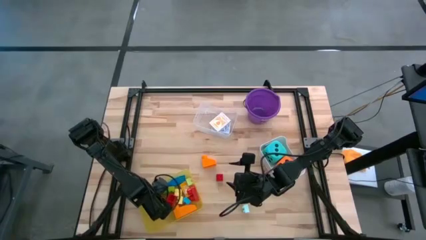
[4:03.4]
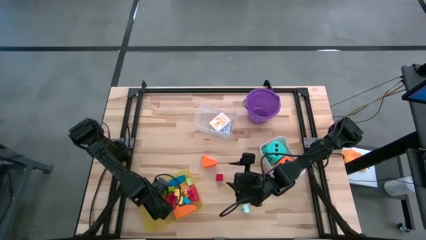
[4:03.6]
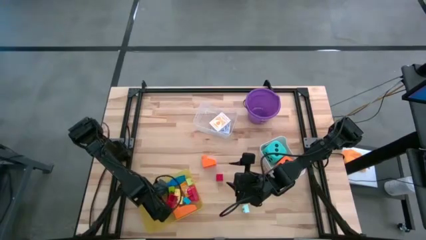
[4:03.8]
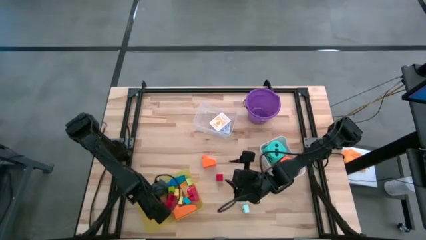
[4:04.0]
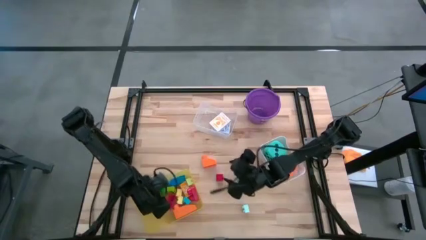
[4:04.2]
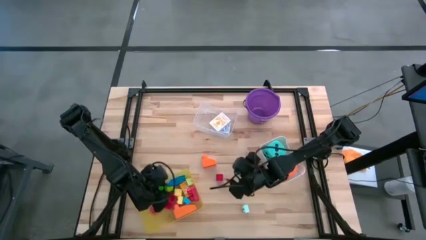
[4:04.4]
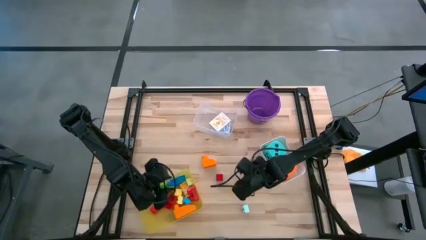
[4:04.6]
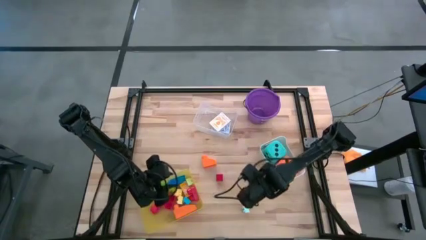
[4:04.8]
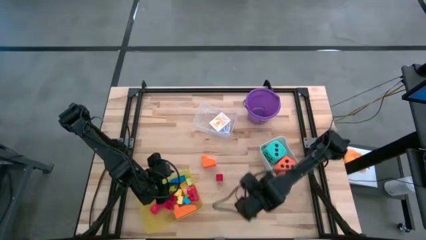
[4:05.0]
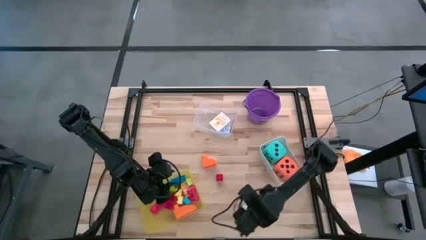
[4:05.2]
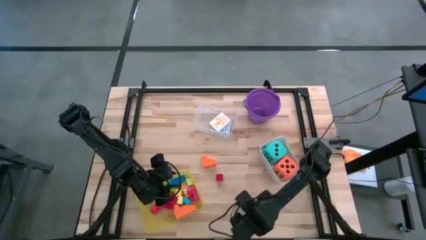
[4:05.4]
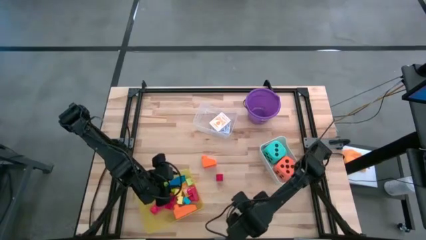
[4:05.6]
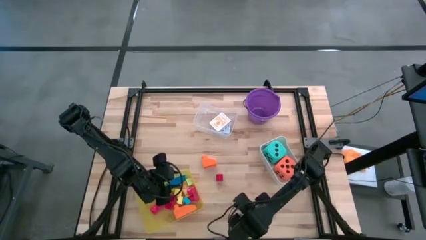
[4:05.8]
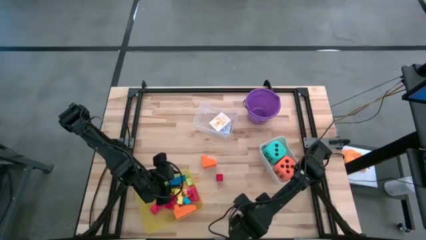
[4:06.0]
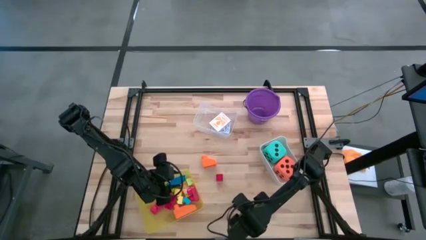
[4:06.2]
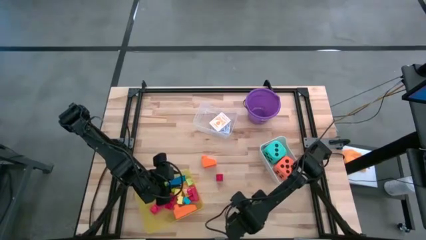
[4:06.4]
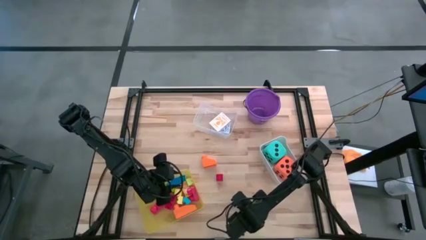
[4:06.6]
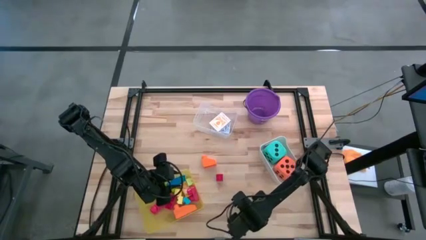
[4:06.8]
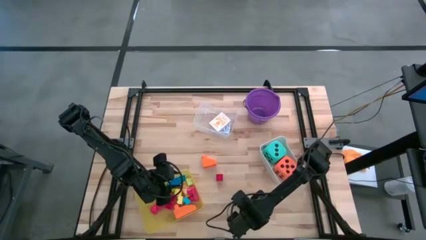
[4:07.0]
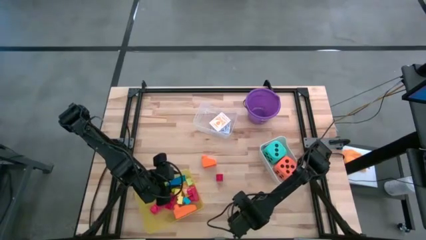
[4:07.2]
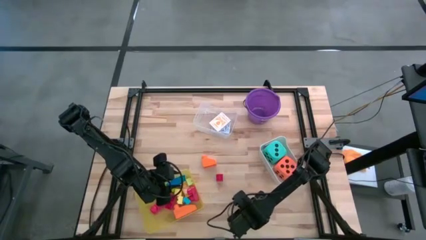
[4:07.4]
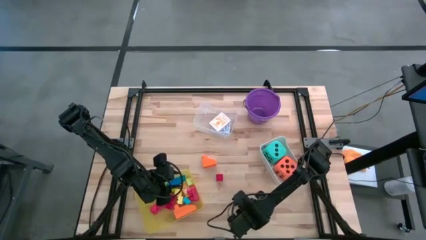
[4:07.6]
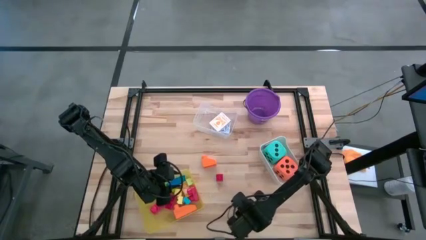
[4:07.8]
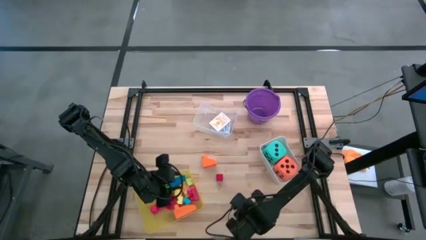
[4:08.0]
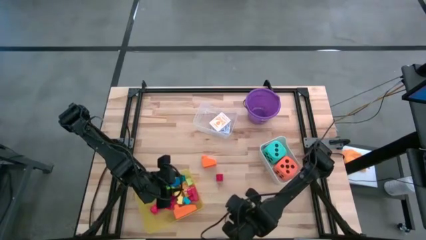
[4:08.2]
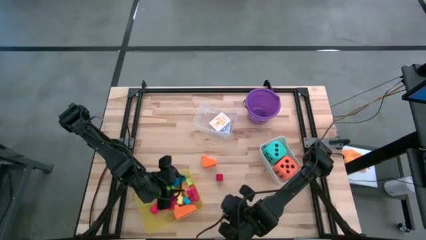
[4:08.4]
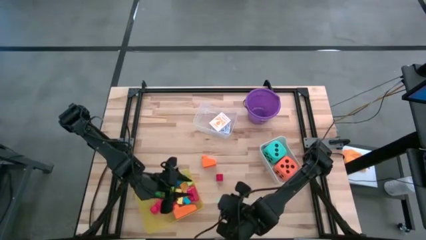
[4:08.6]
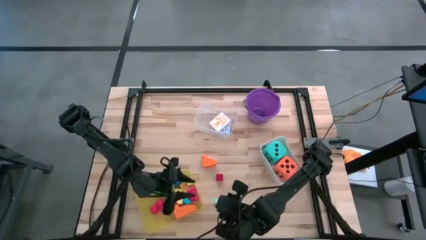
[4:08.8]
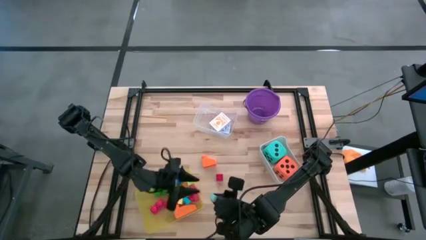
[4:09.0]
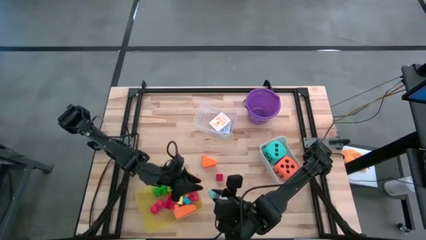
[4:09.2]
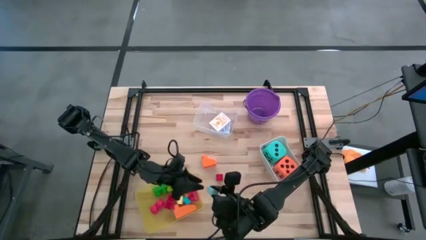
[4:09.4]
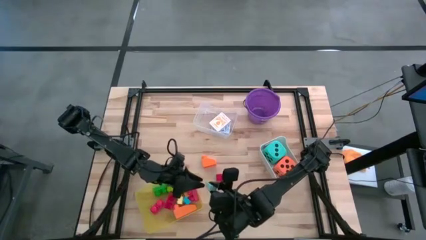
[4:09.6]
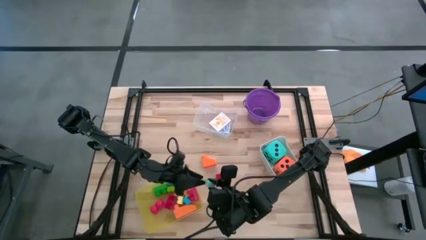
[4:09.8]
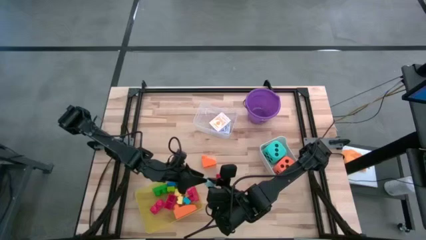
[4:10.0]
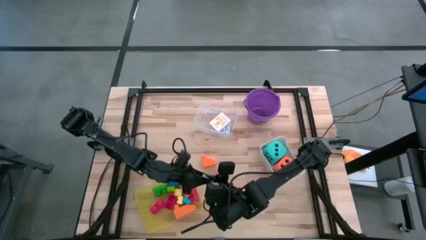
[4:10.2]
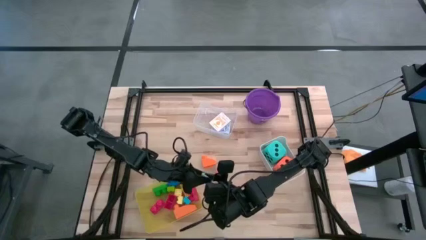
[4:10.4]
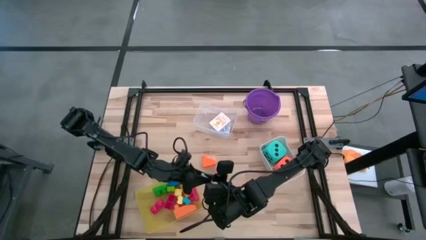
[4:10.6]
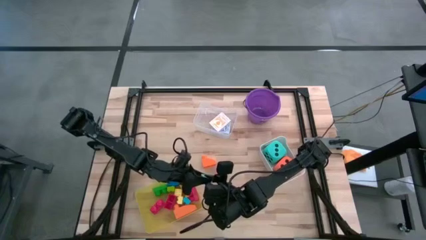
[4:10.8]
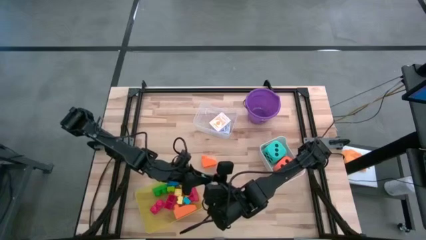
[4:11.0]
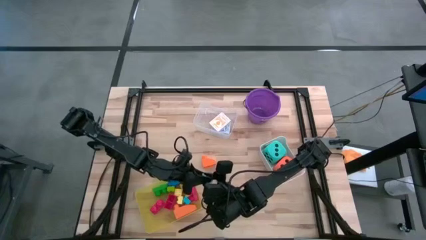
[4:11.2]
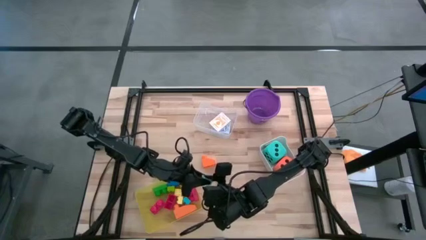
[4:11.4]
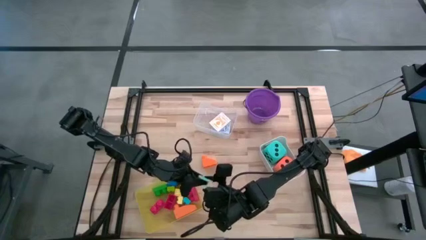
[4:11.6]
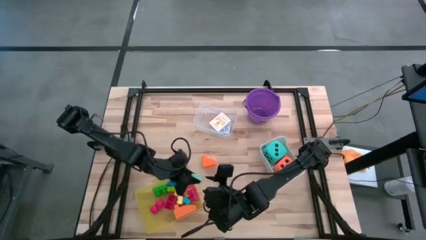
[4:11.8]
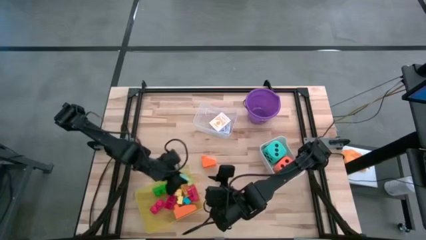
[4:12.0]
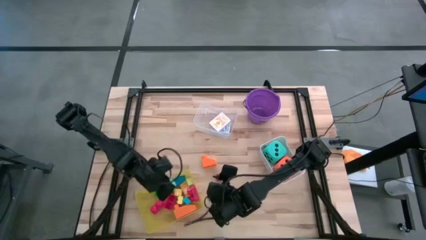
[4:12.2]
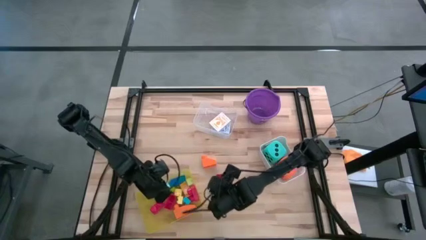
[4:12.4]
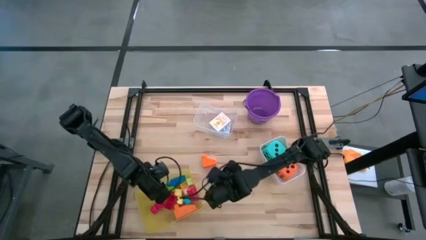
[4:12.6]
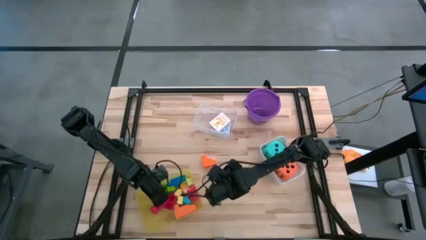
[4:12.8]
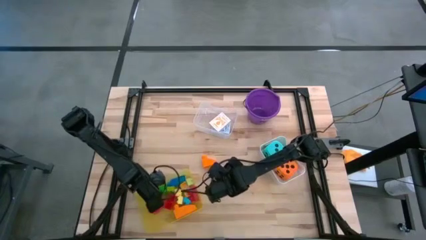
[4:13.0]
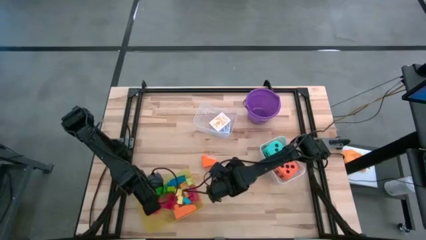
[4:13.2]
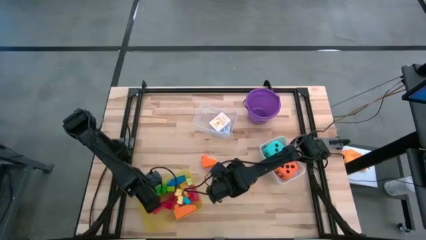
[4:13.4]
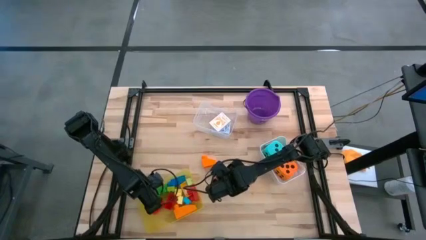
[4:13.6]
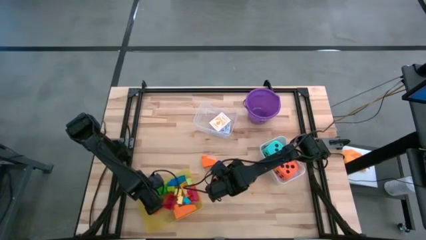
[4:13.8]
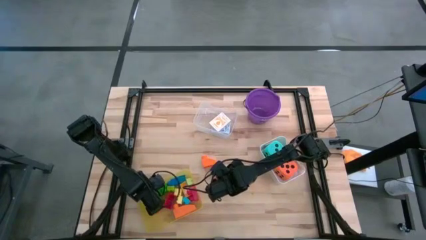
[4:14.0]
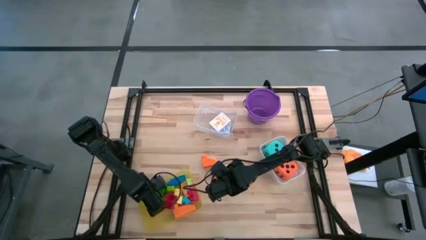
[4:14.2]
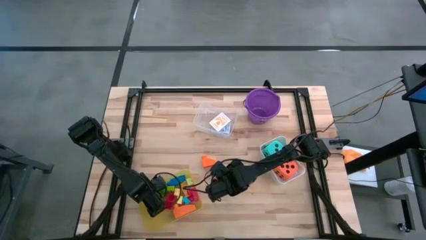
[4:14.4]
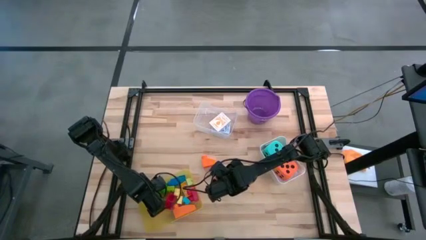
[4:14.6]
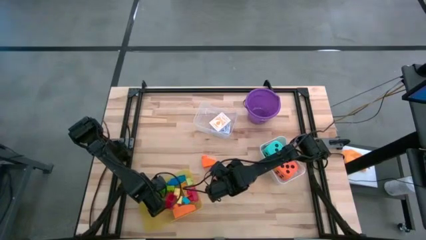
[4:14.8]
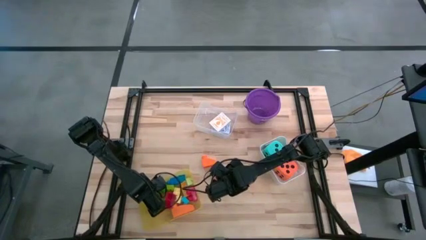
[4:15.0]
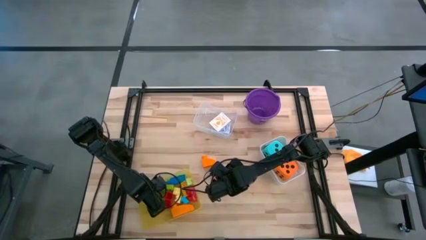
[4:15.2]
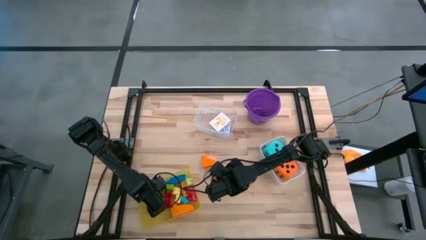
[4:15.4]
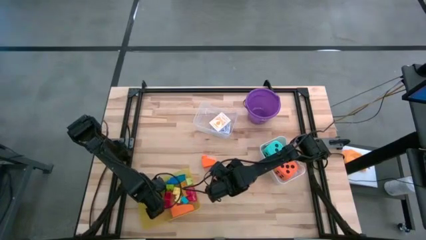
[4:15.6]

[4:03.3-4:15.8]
Task: Pick & Place Toys
Put the white game piece into the yellow bin
